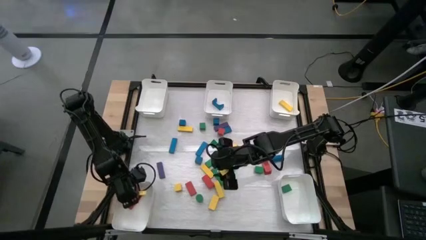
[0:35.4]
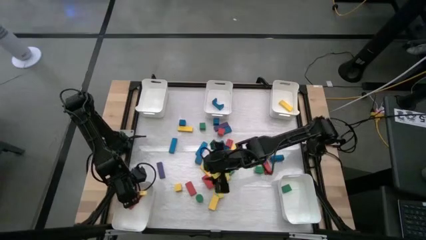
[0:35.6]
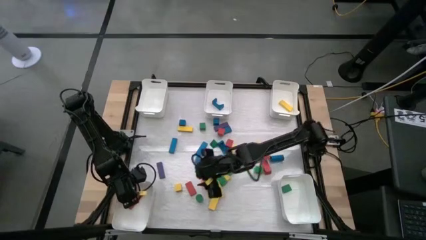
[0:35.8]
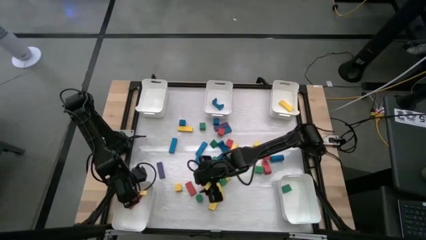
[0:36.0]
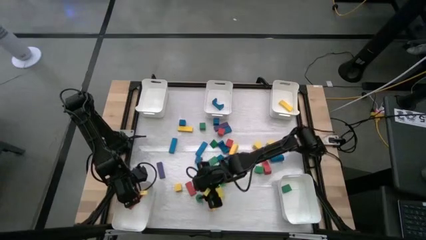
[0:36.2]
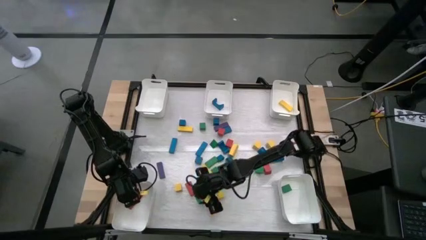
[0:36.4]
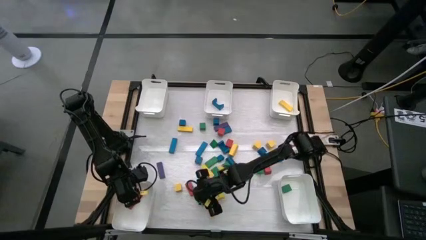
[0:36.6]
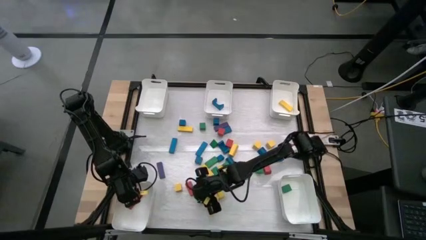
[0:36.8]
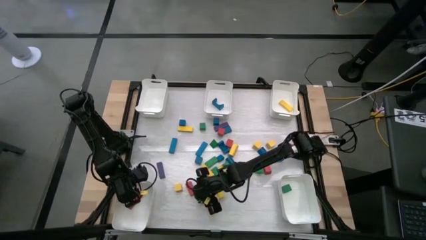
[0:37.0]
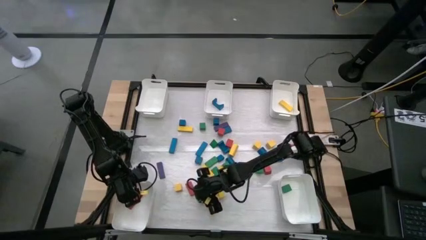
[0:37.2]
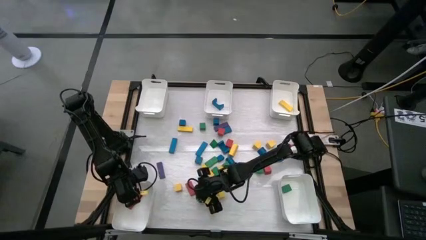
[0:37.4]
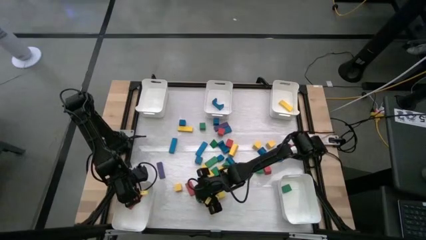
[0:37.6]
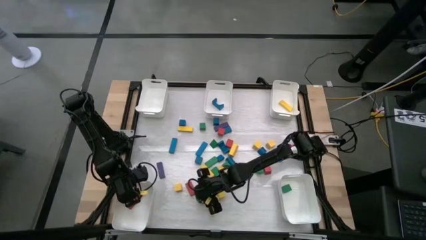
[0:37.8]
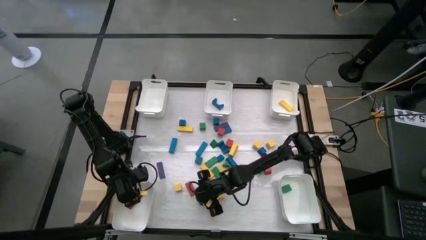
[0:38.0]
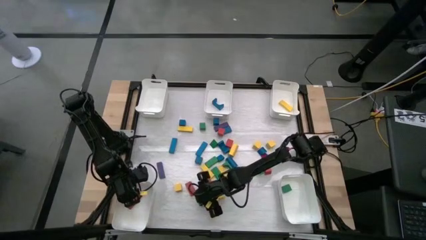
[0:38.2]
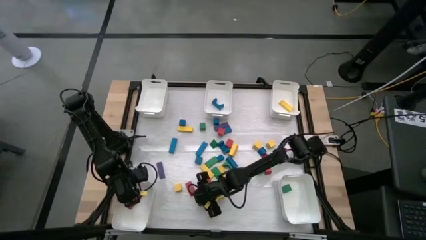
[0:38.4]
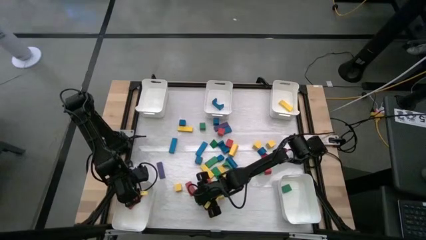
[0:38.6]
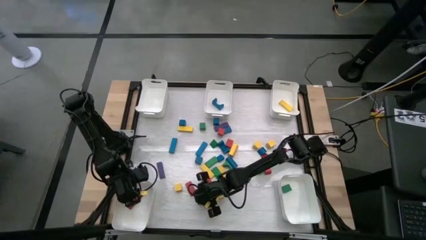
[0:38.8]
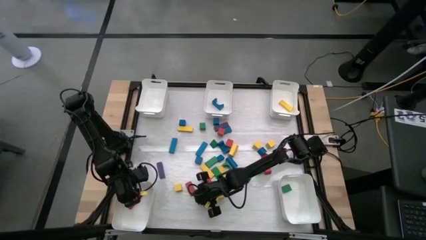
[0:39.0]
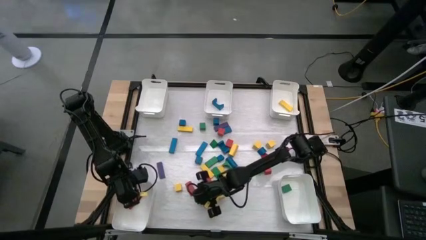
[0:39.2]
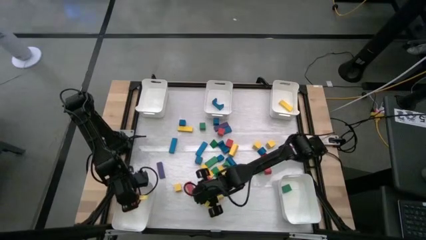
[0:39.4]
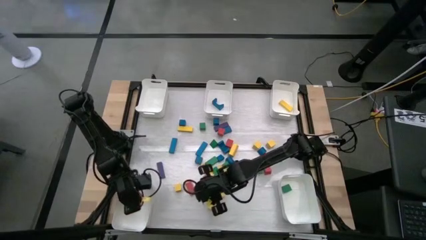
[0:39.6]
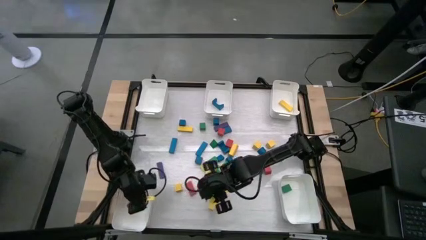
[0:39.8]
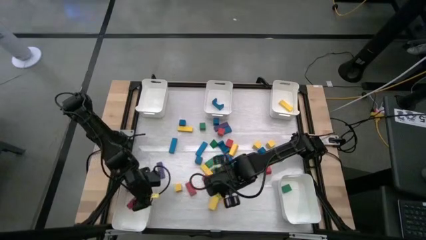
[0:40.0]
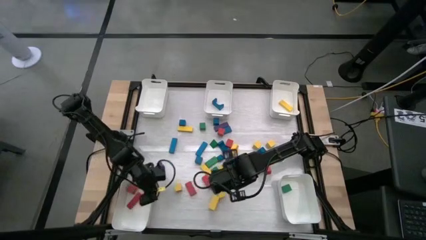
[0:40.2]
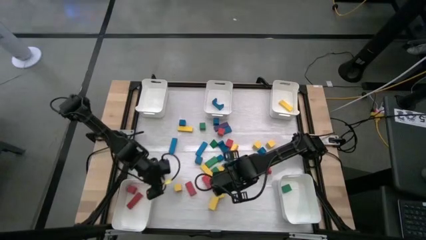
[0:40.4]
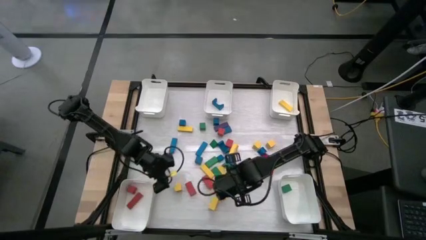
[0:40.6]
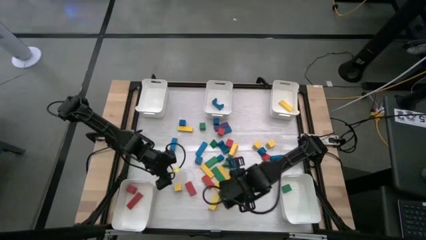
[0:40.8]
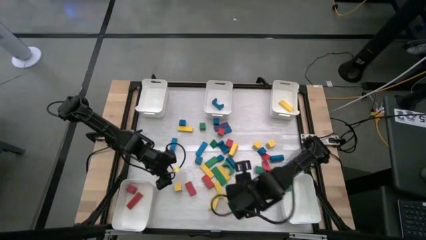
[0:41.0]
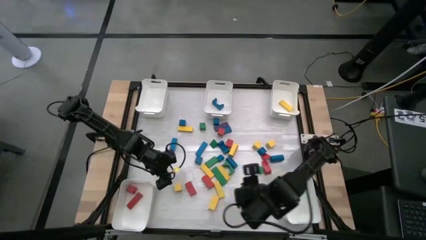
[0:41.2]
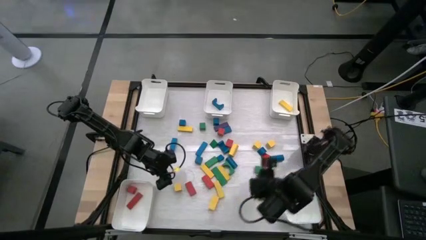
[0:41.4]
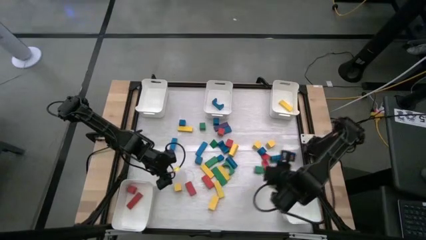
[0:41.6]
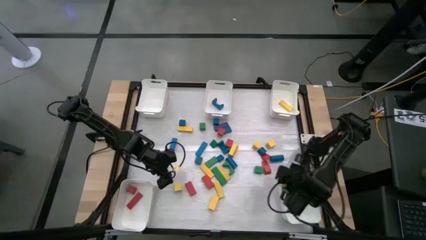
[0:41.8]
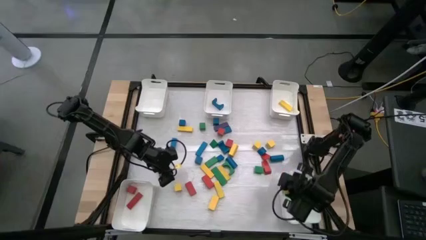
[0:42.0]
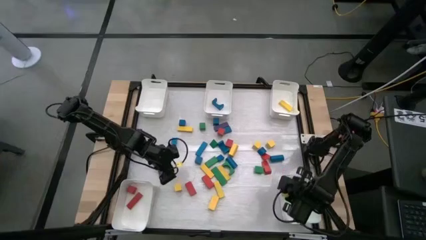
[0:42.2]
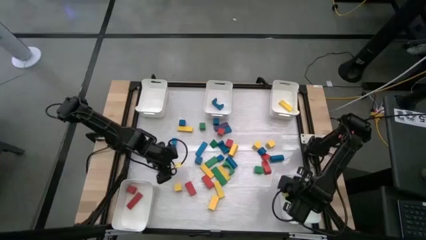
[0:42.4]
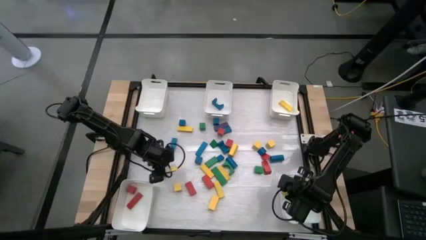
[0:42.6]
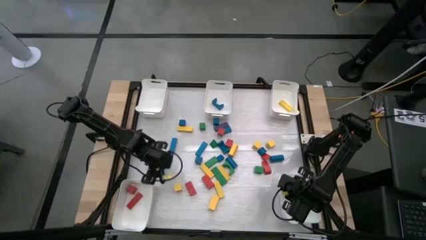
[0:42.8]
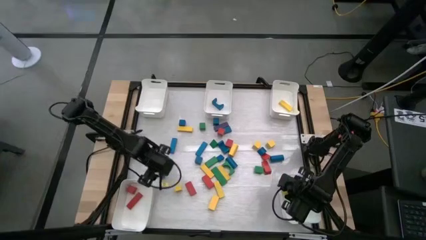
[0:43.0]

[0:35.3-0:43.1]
Task: Sort blocks
Put the green block into the bottom right white bin

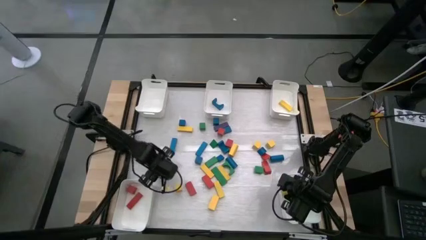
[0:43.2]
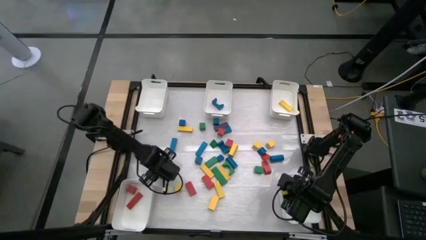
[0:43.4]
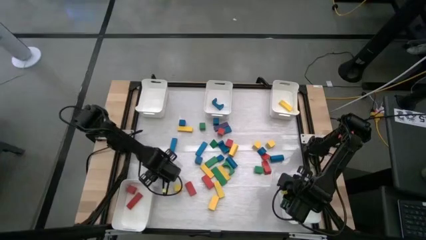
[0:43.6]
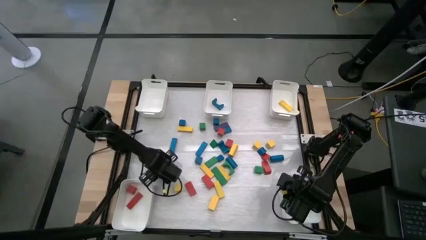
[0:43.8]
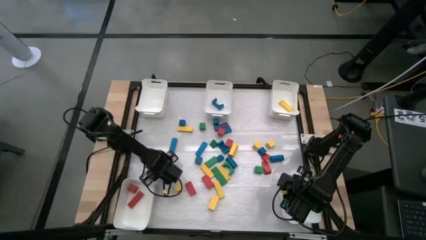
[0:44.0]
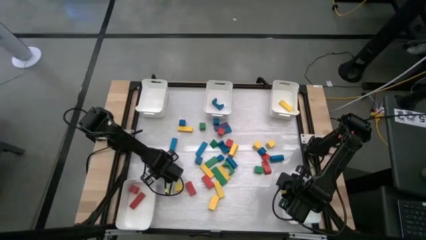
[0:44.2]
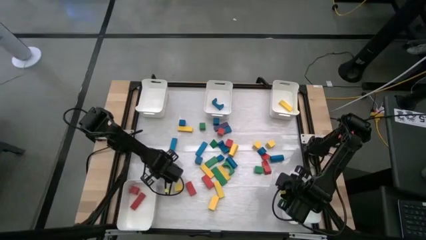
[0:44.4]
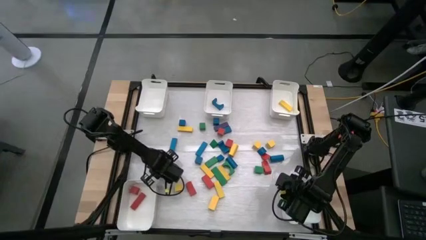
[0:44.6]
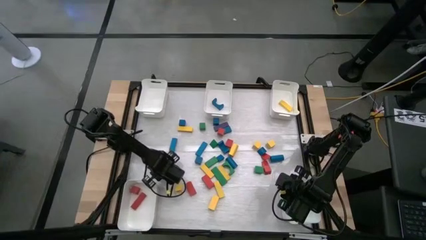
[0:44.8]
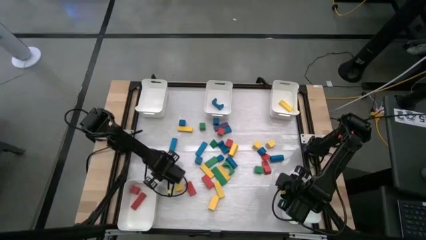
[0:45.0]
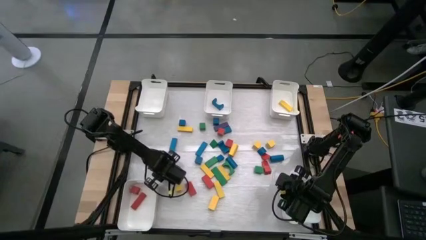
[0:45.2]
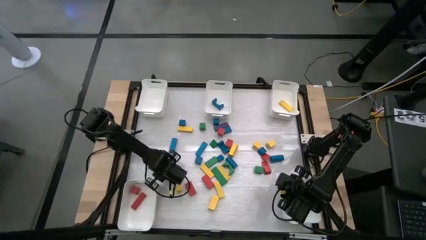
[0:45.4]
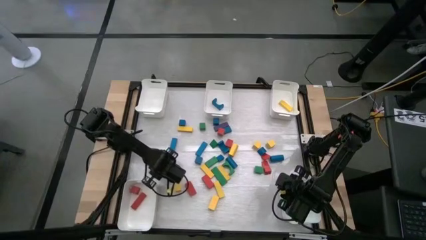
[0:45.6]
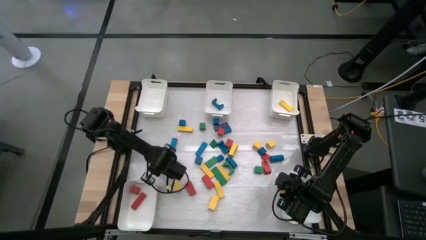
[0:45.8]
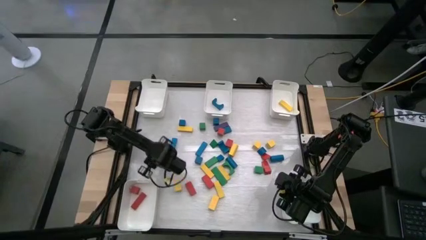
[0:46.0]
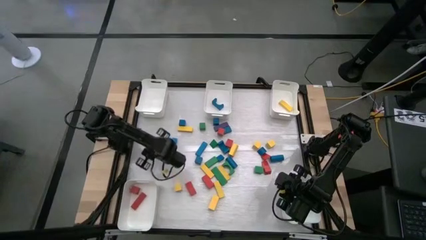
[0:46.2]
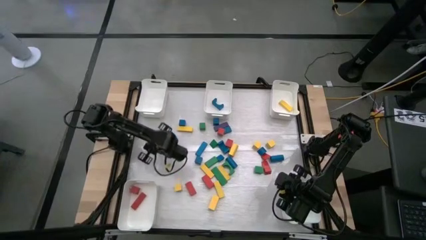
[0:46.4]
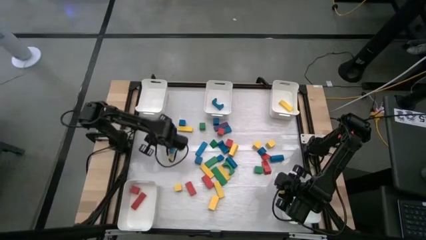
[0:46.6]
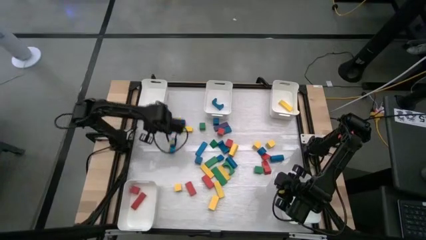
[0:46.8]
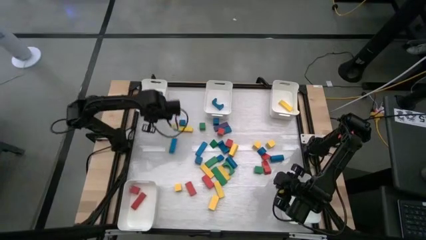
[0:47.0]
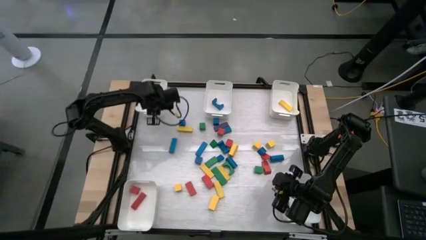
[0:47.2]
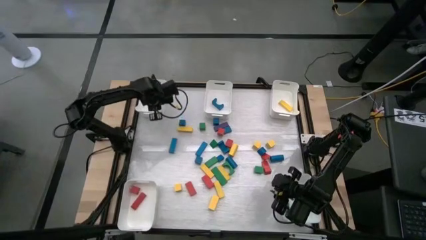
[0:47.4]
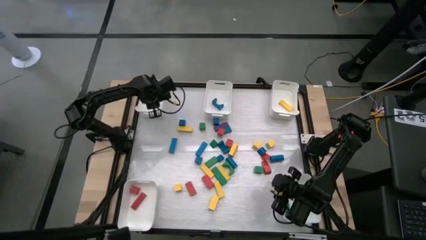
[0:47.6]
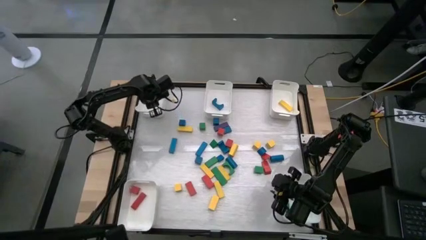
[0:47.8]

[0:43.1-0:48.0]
Put the violet block into the top left white bin

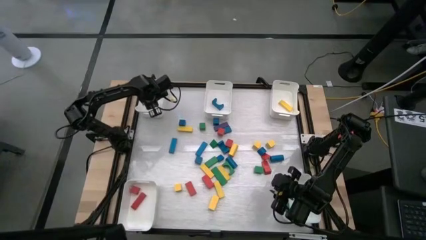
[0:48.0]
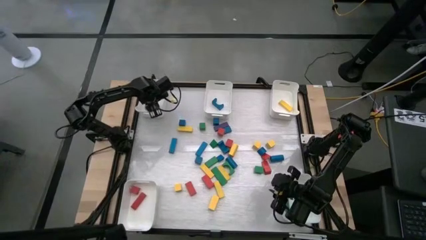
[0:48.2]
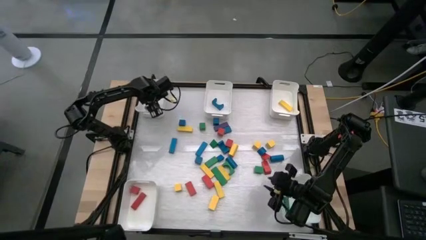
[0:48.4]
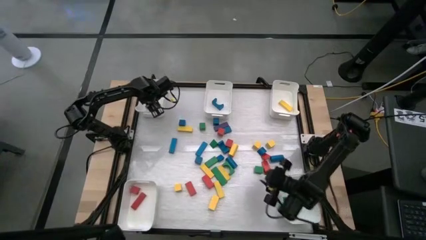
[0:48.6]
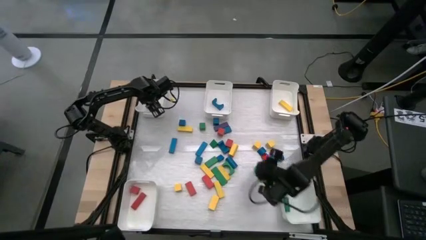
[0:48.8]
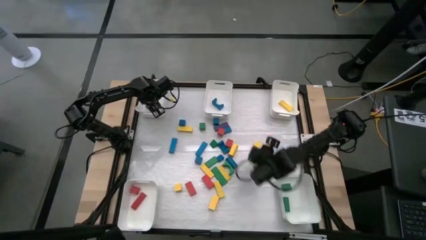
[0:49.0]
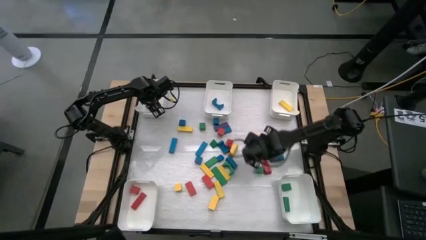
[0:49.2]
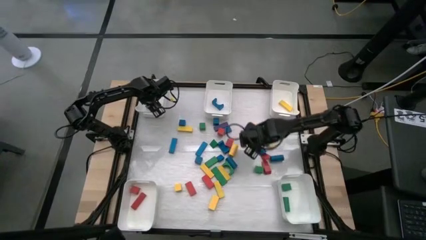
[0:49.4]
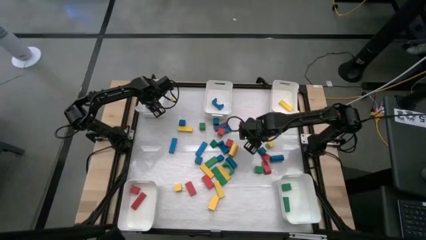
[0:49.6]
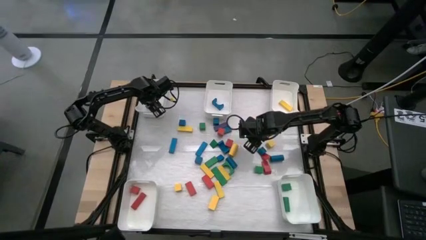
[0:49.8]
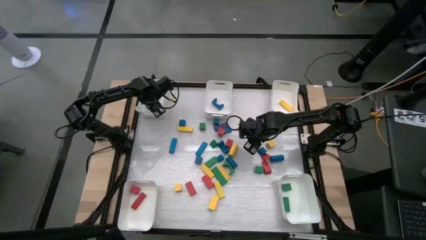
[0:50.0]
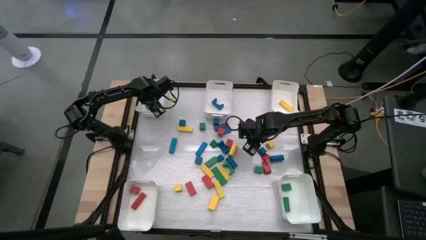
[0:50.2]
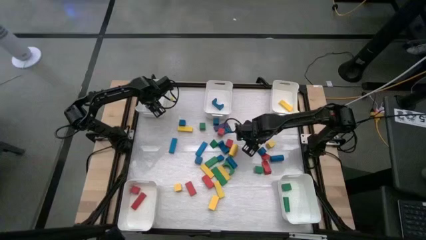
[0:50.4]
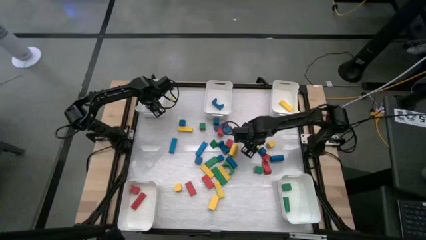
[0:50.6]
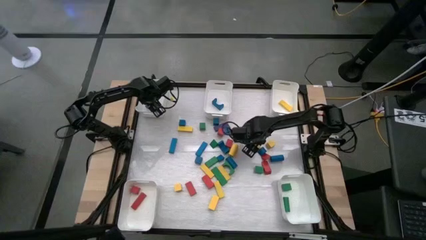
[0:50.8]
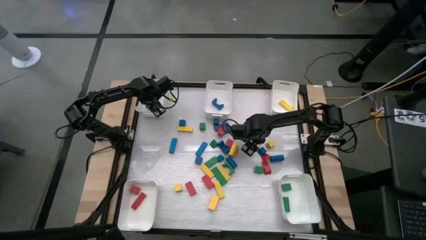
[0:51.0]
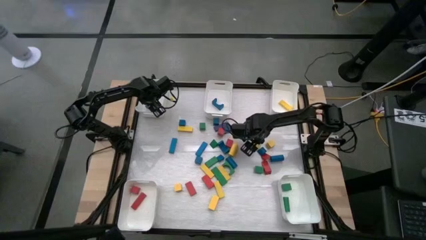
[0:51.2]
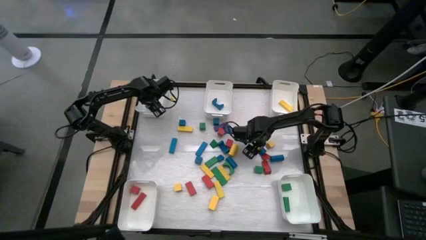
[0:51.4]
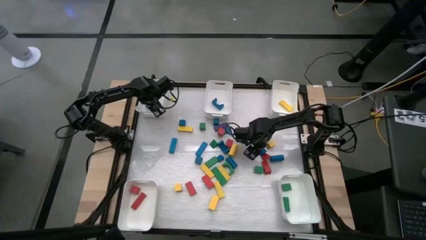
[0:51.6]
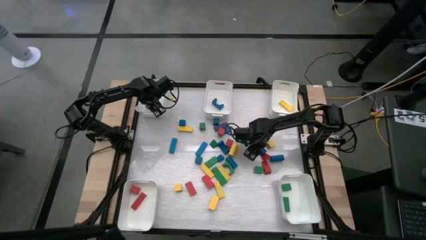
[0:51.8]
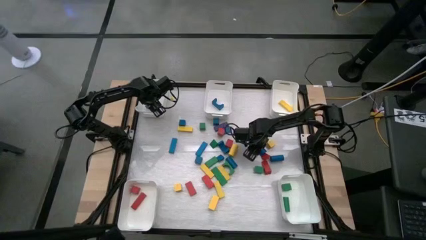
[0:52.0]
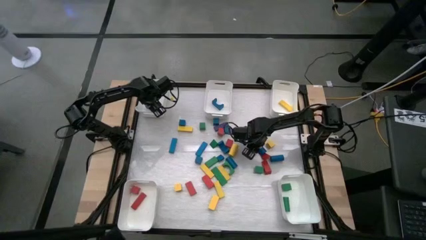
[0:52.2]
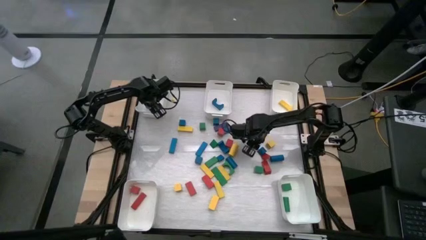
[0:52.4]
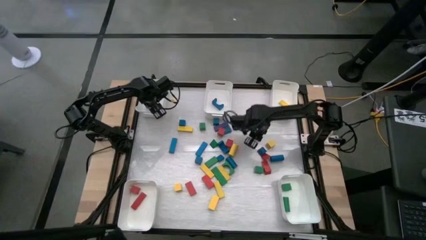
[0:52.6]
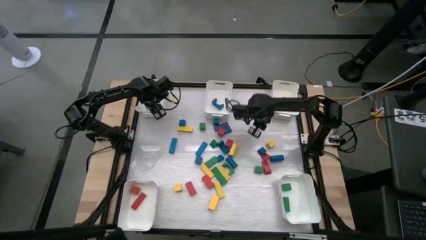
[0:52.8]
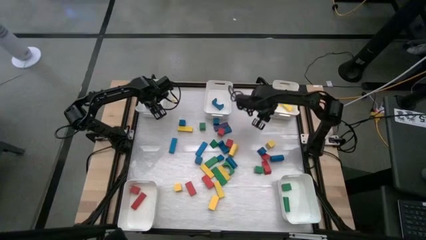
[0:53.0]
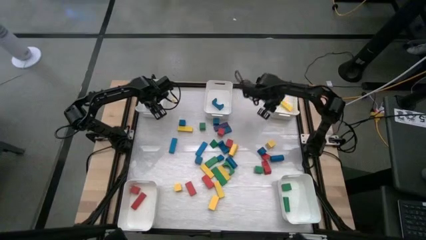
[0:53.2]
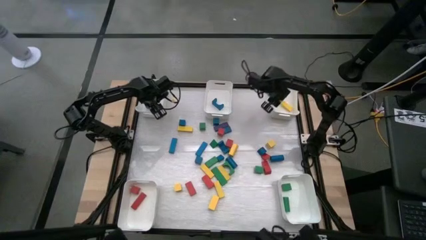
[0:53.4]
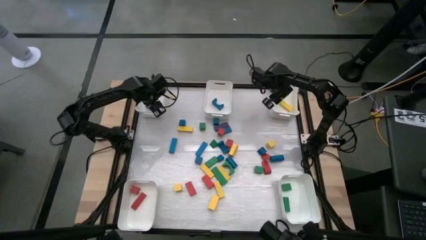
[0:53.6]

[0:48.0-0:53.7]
Put the yellow block into the top right white bin
